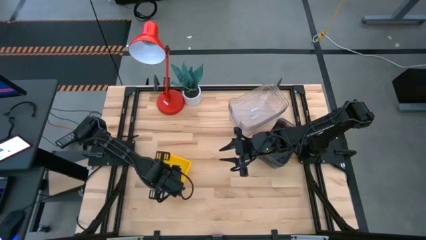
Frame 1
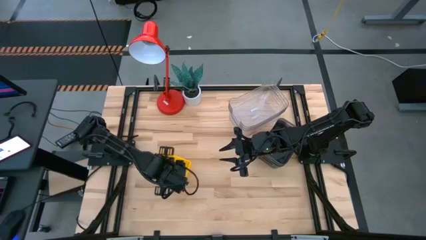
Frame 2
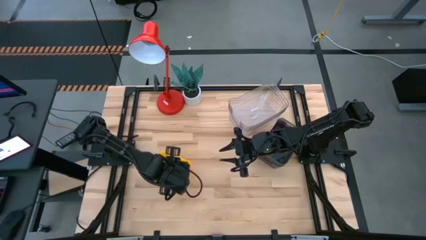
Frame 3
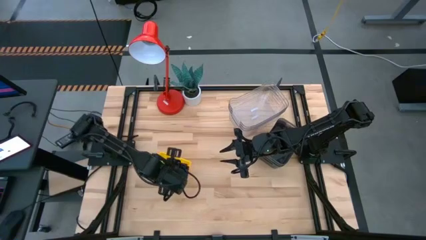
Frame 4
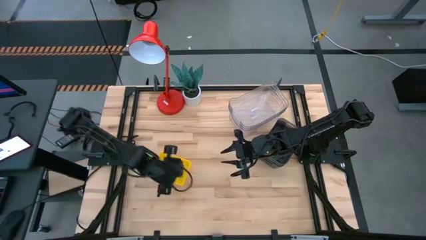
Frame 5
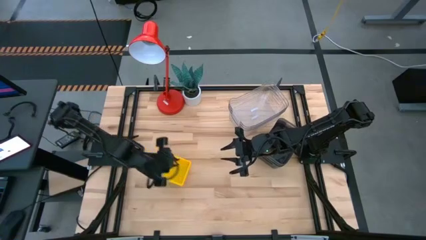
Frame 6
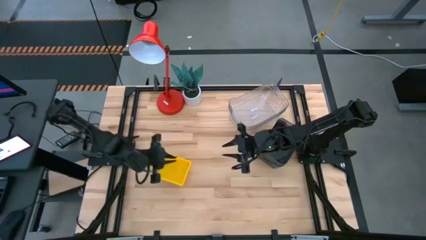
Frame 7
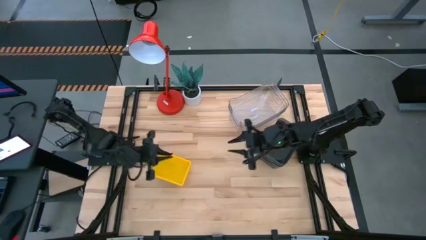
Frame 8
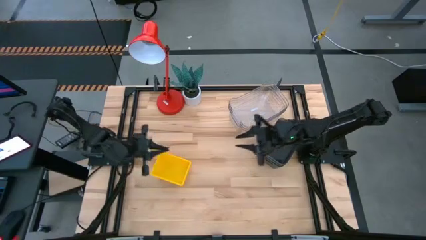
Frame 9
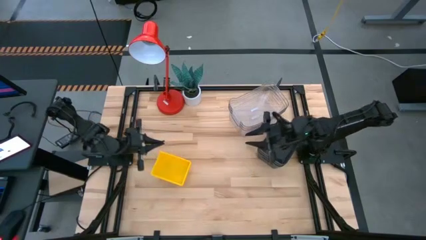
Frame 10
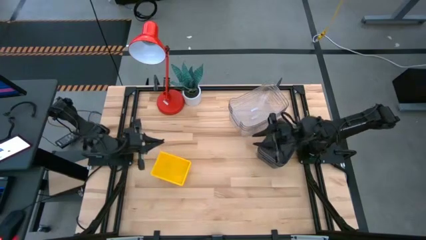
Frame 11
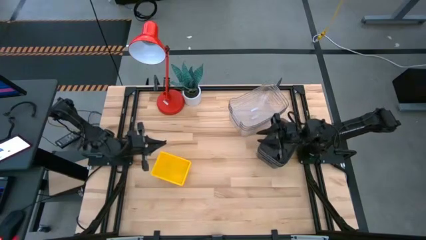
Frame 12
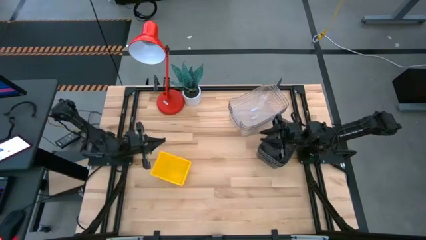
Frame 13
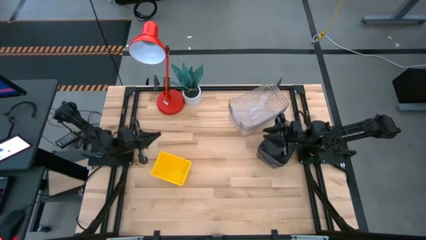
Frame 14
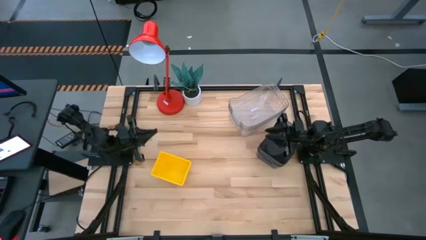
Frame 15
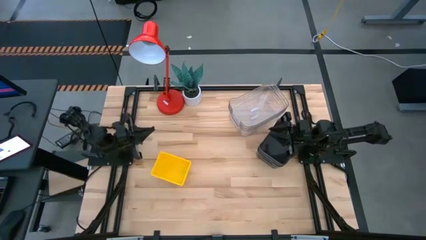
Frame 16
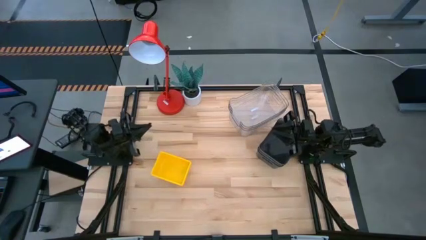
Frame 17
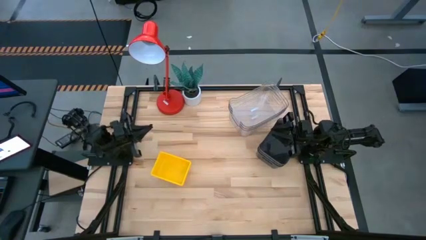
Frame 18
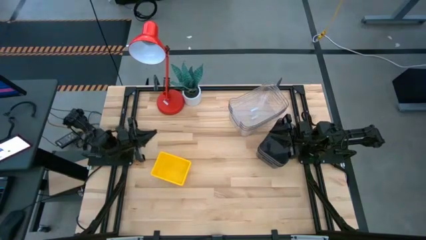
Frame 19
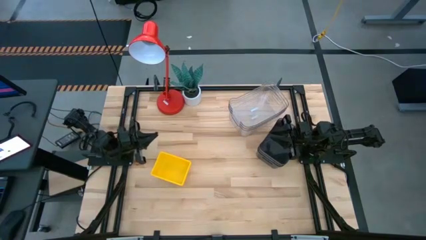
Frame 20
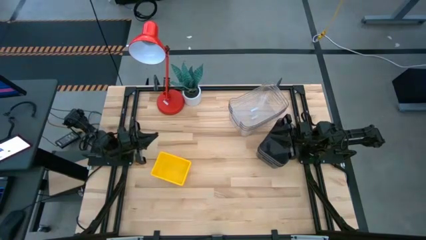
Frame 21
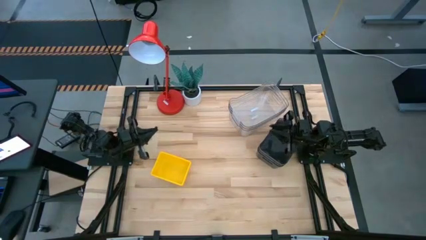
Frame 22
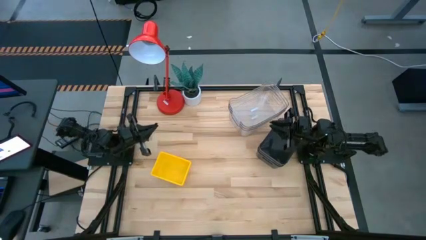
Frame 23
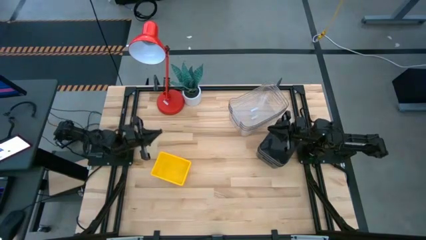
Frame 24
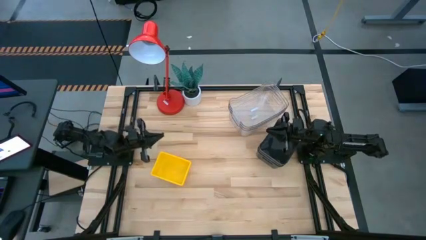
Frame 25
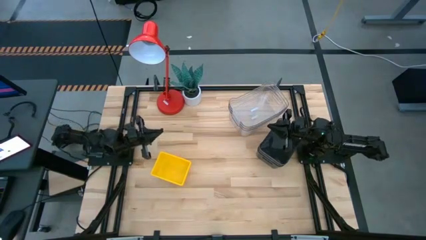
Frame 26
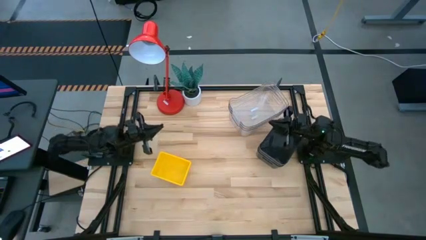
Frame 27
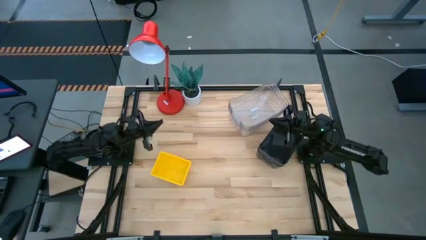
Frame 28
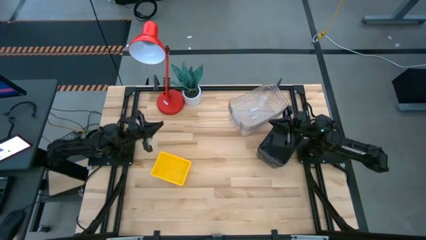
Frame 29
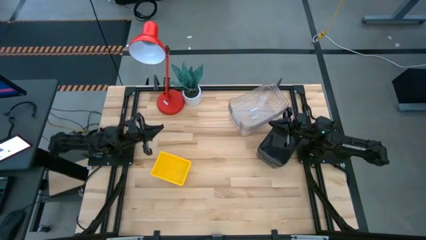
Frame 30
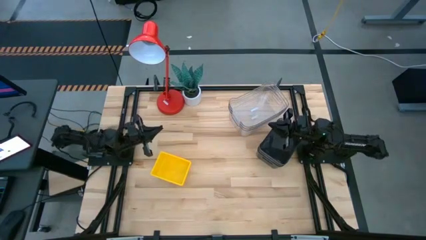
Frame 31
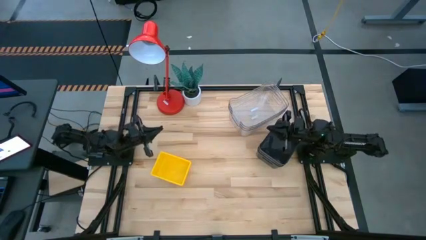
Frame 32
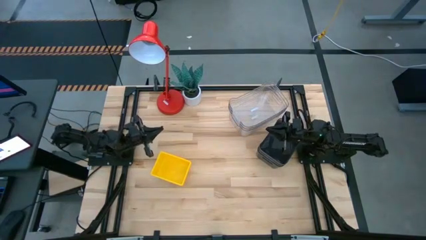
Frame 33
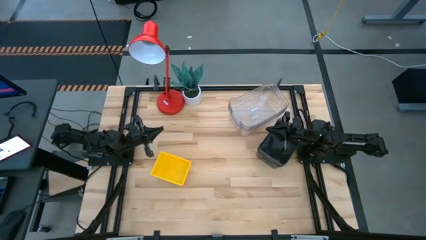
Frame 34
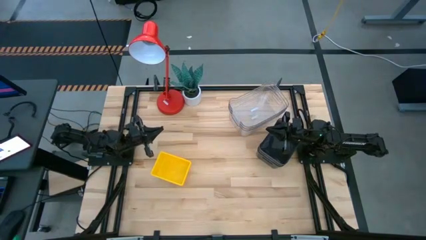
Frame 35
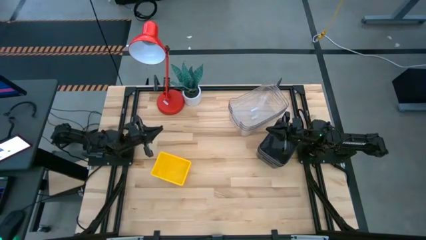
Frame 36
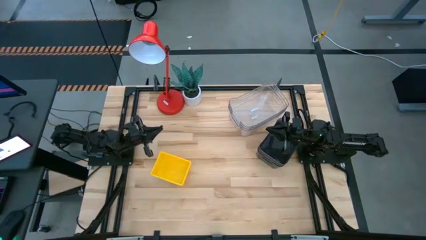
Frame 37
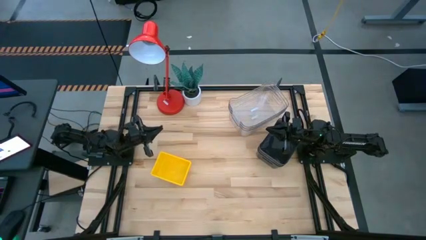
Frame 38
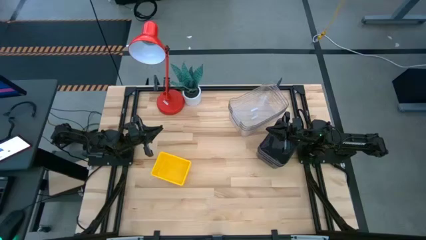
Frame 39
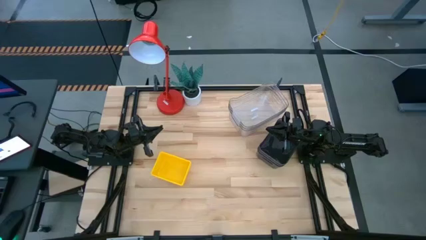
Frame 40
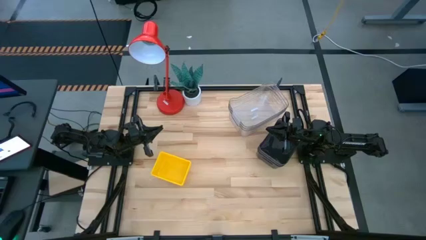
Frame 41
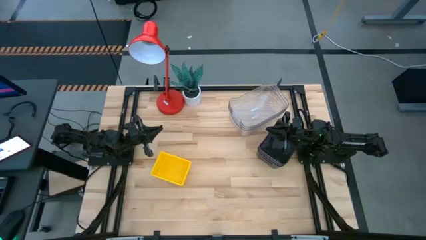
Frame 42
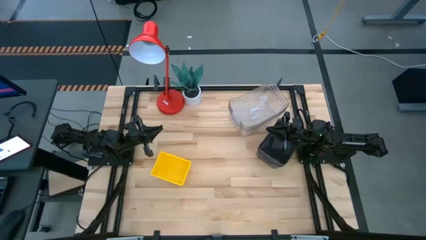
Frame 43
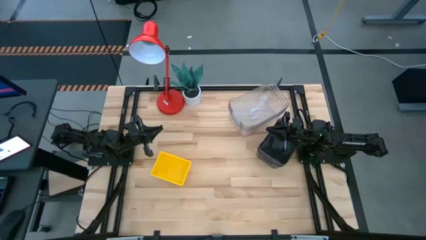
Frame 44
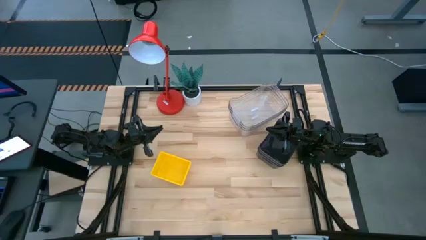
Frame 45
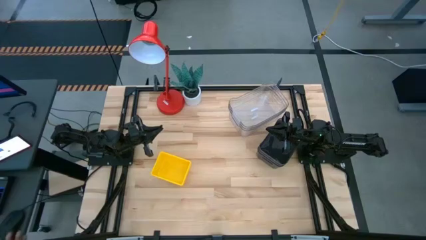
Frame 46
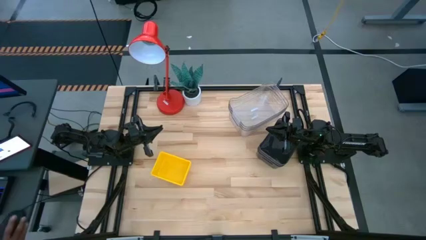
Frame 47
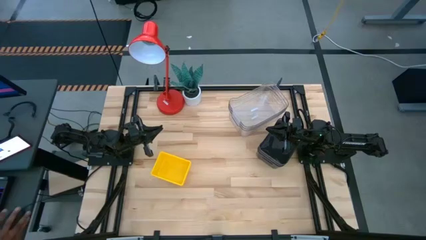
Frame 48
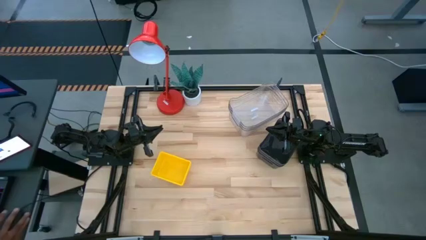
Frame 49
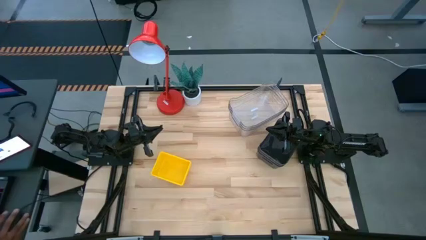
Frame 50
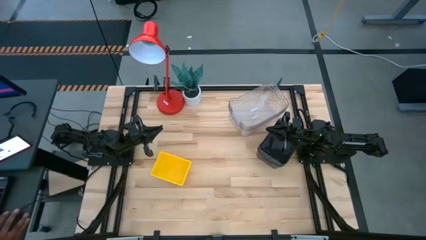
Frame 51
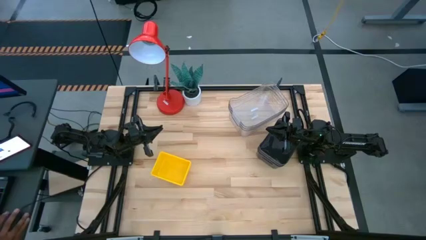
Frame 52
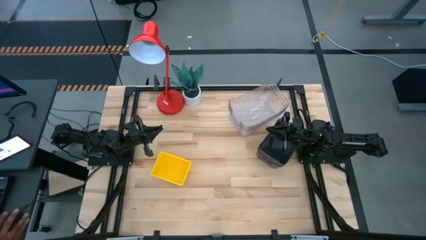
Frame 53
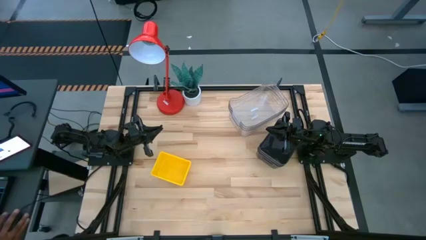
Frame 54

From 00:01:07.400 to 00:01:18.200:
Return to Home Position
